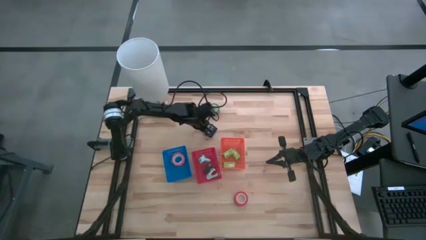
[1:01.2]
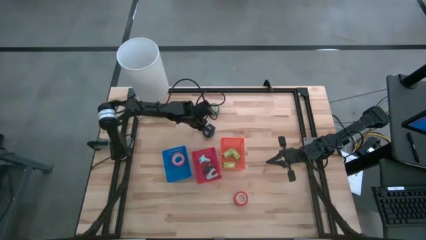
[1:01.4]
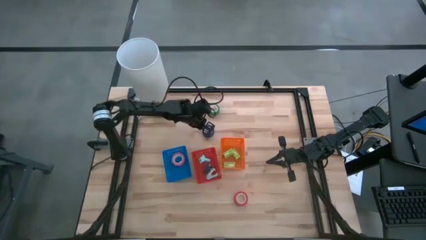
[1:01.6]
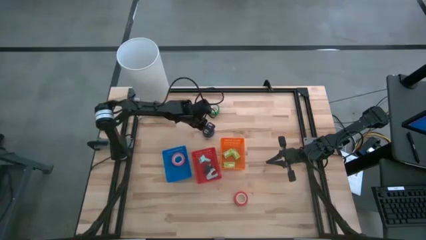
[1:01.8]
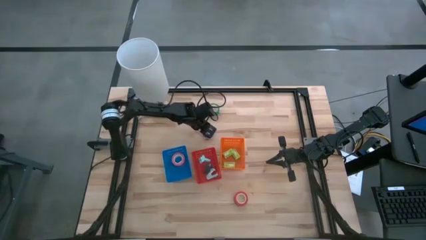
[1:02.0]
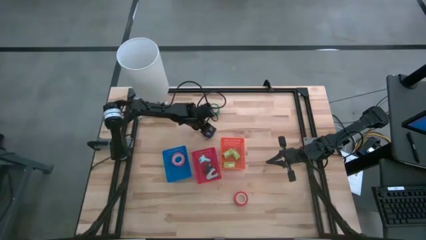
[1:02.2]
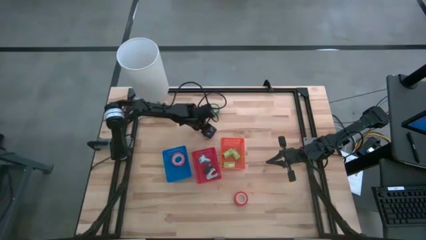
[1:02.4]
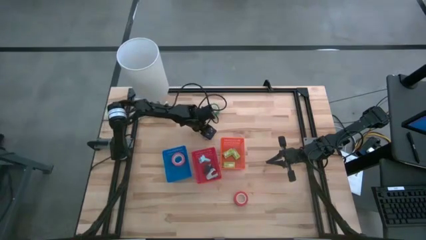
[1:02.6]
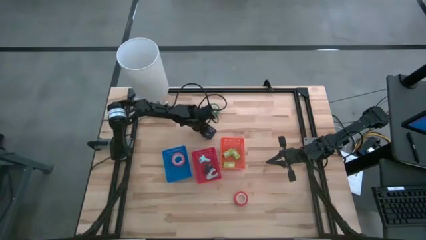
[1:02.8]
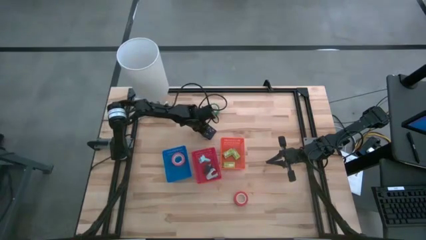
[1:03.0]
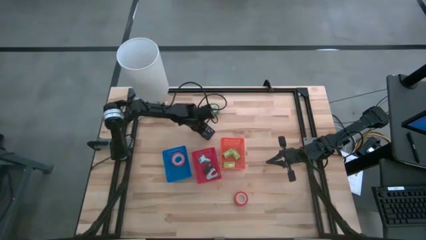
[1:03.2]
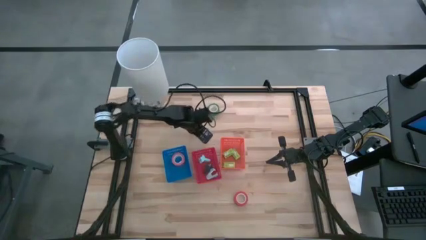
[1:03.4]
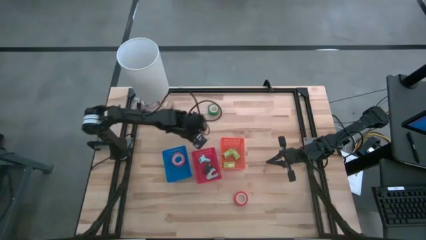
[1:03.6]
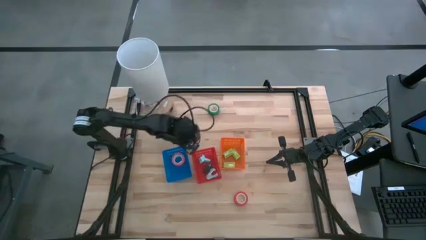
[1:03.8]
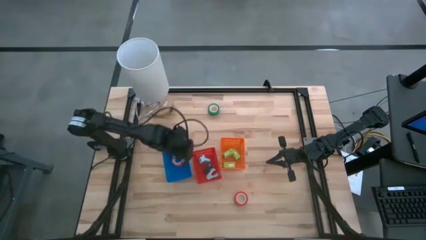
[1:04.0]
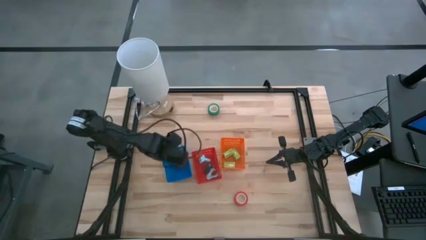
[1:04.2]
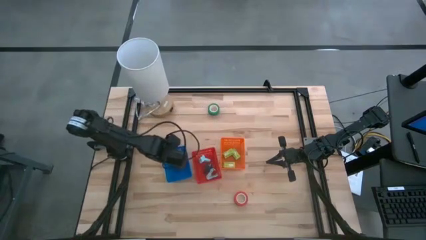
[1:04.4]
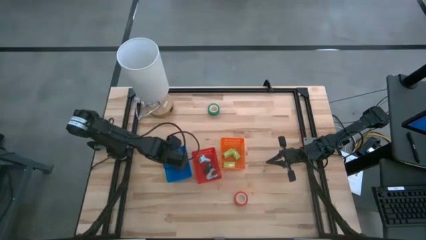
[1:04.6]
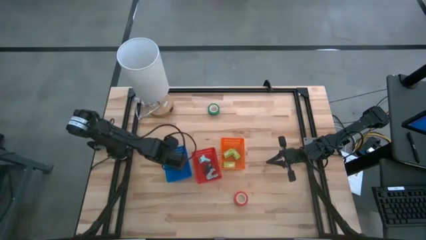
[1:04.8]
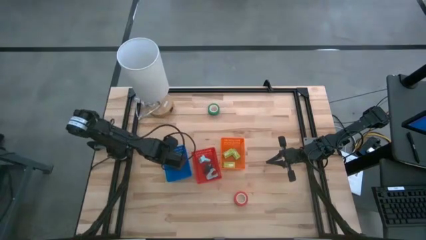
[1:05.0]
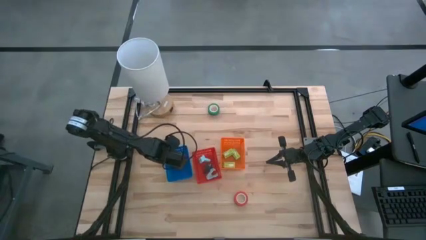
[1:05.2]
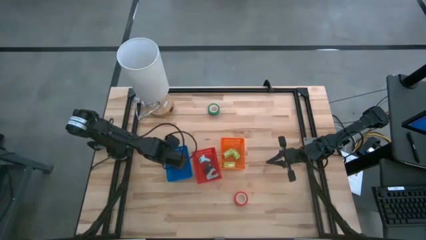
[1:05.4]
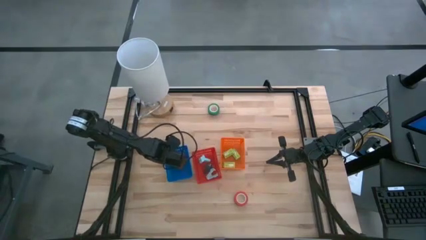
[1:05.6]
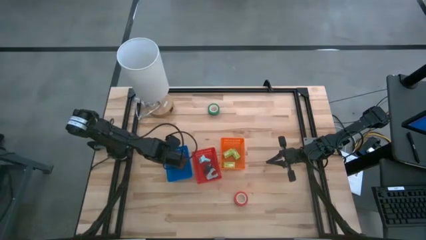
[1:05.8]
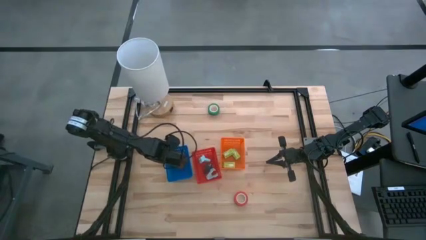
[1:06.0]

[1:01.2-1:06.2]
Task: Pick and place Stapler, Stapler remover, tape
Put the blue tape into the blue bin

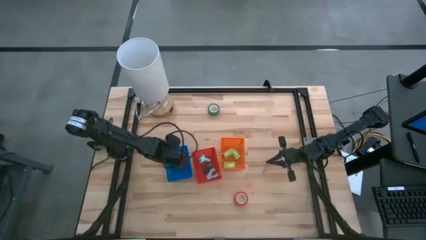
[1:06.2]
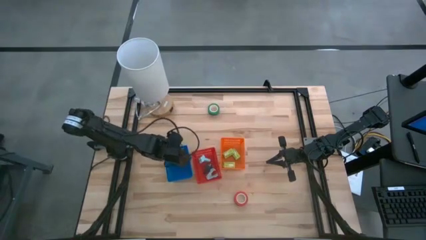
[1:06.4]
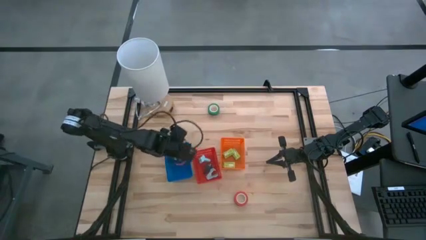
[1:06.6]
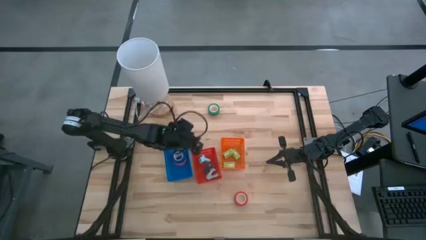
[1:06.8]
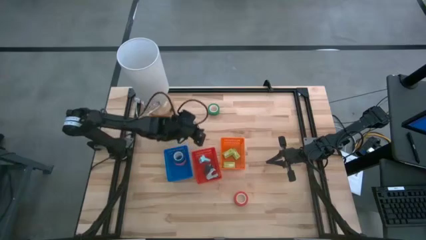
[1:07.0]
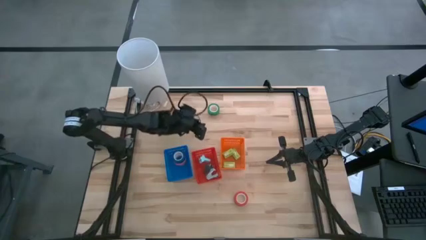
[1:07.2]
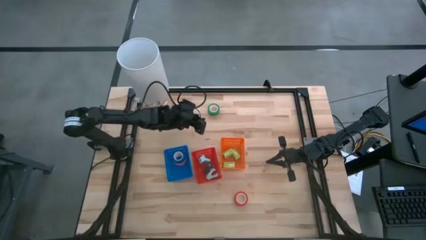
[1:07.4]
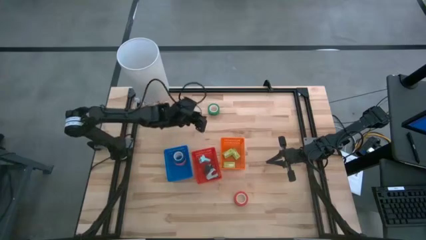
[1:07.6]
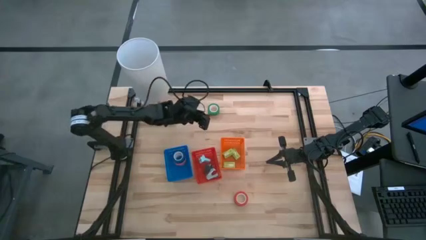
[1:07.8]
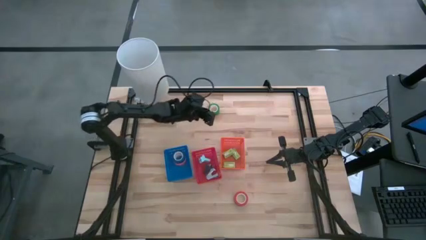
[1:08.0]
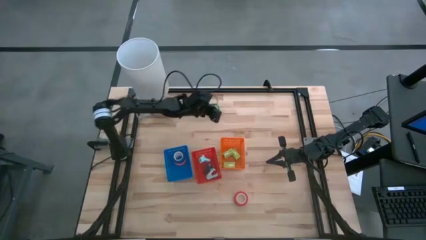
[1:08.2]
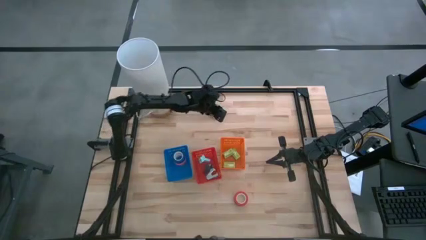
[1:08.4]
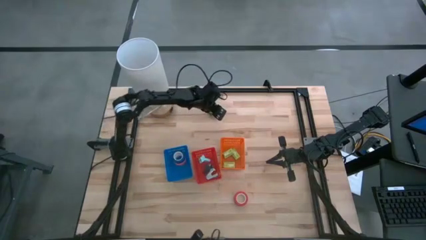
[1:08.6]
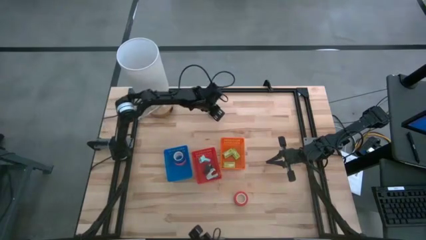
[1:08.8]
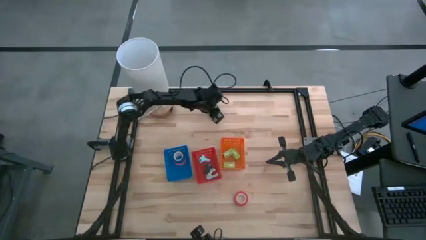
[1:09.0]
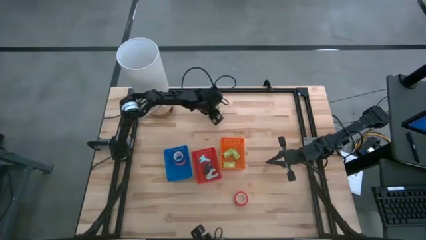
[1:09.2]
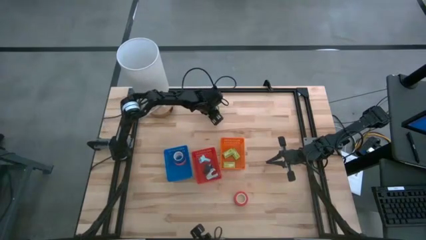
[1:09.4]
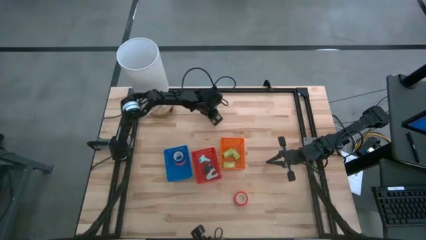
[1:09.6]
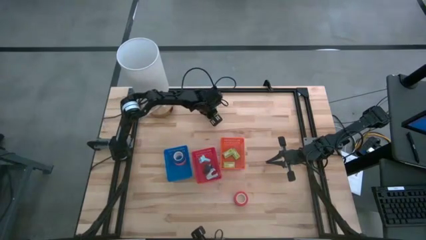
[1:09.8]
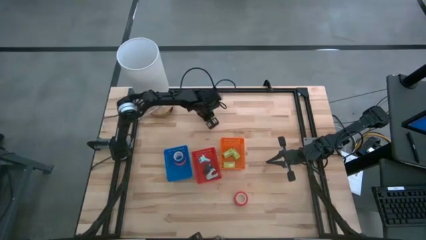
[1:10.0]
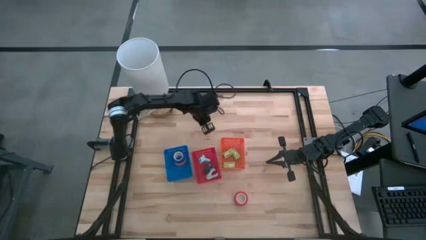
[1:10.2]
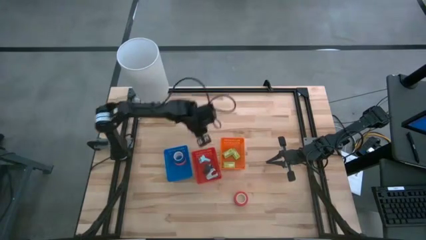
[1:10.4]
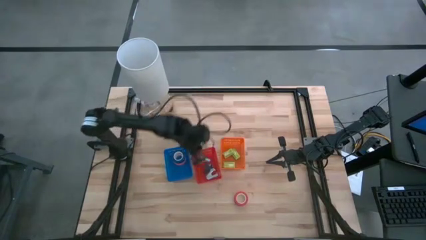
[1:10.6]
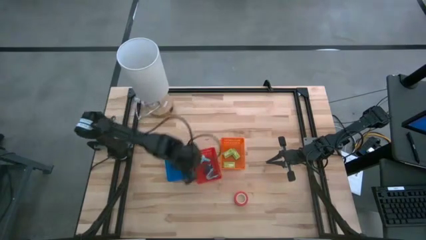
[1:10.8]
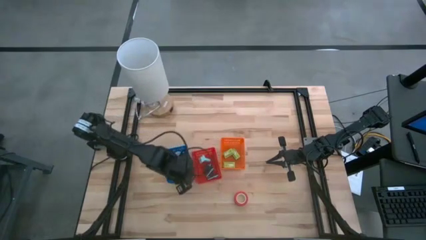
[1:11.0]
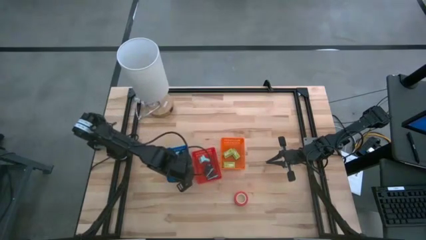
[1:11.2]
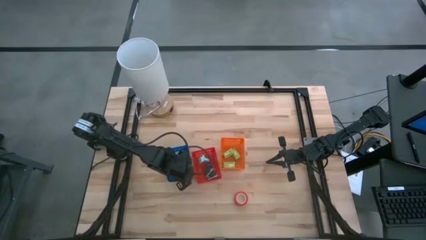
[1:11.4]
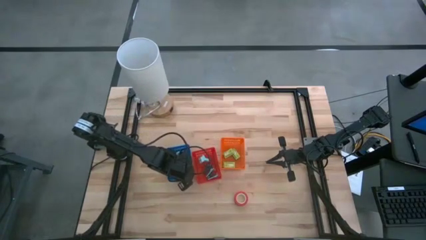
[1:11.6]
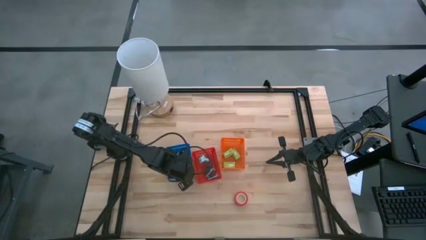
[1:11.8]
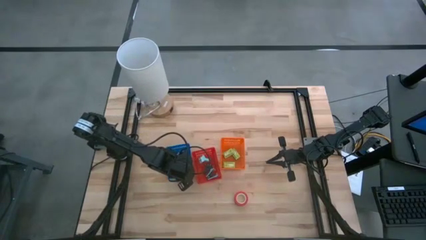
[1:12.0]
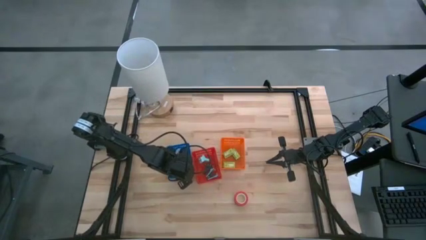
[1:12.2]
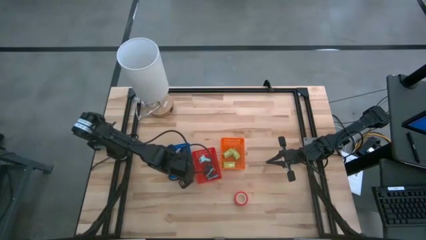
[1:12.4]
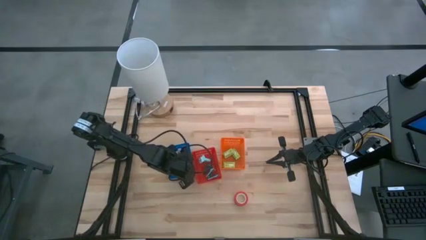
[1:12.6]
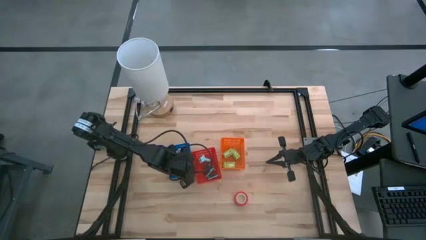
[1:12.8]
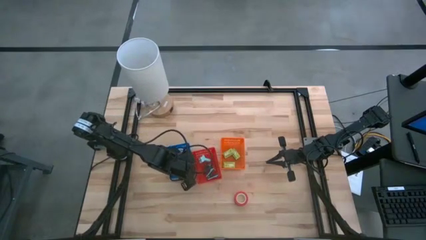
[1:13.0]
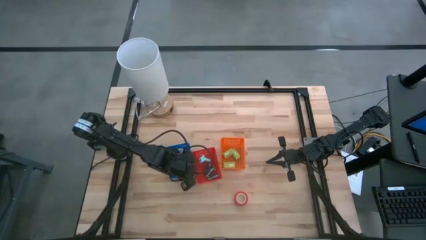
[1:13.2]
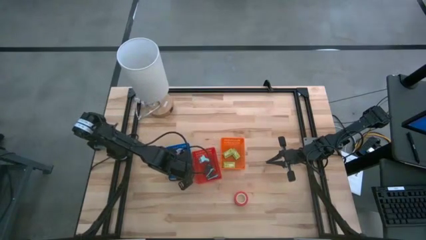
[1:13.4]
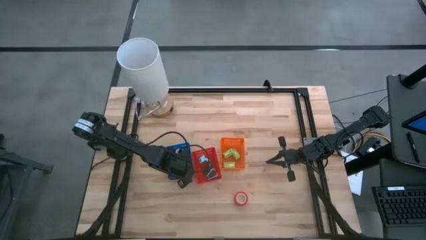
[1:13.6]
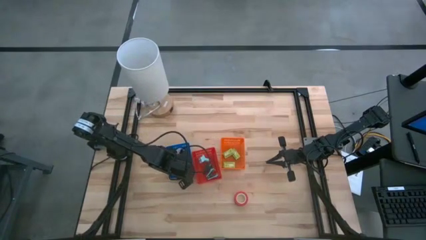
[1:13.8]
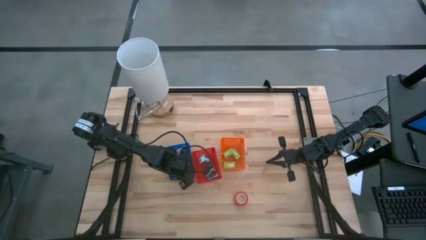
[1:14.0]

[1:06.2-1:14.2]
Put the green tape into the blue bin

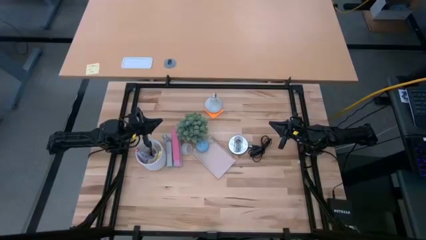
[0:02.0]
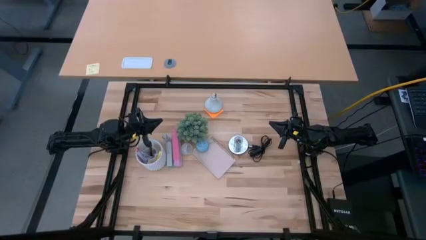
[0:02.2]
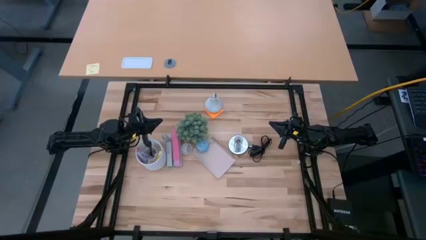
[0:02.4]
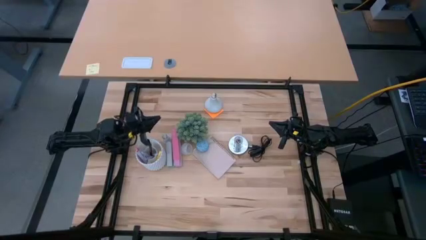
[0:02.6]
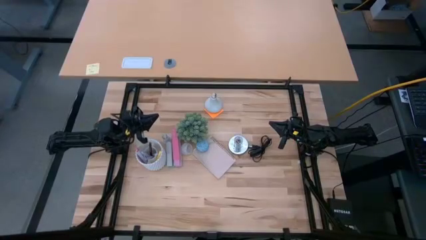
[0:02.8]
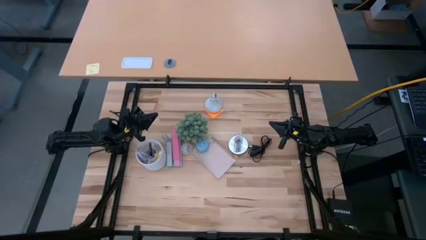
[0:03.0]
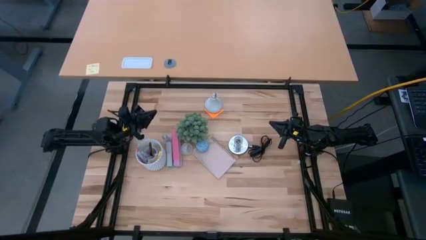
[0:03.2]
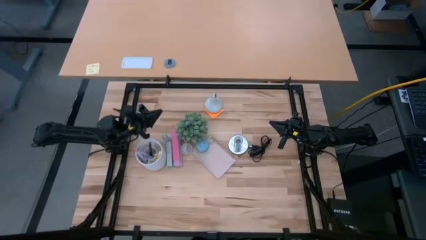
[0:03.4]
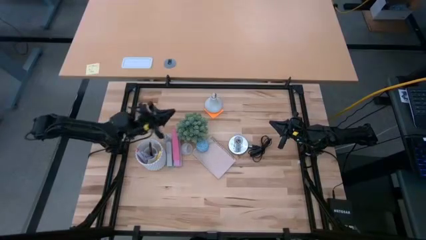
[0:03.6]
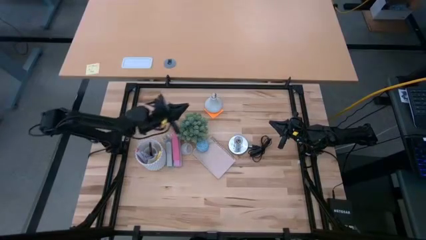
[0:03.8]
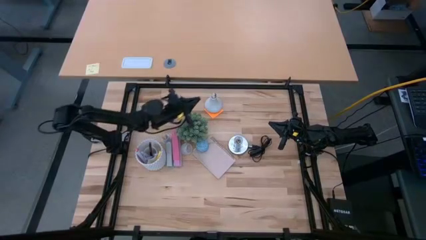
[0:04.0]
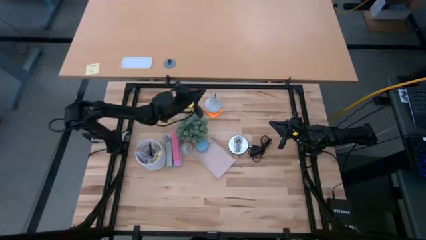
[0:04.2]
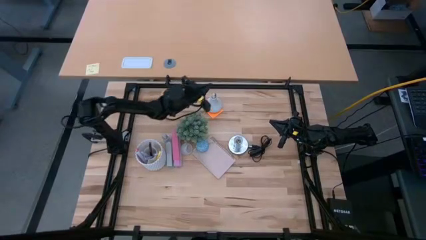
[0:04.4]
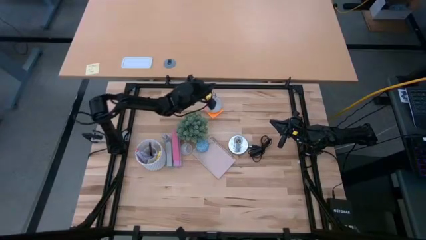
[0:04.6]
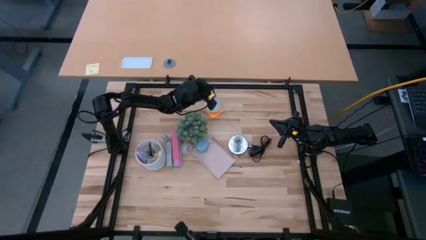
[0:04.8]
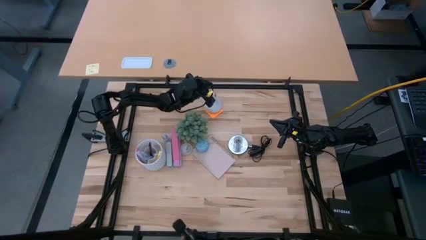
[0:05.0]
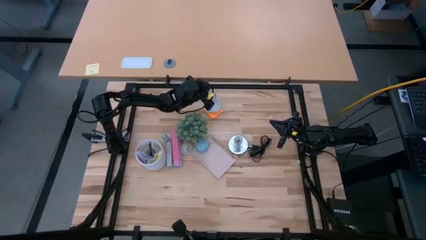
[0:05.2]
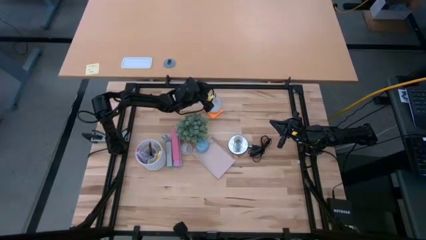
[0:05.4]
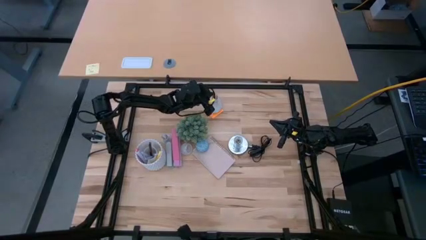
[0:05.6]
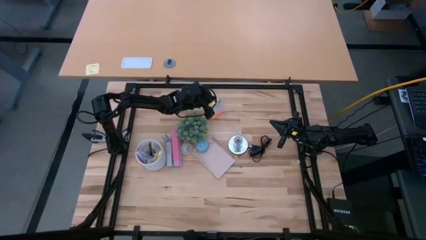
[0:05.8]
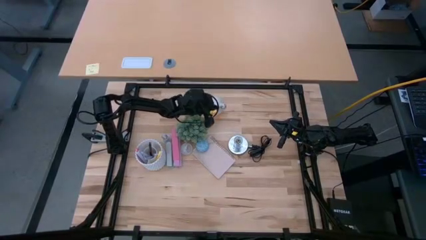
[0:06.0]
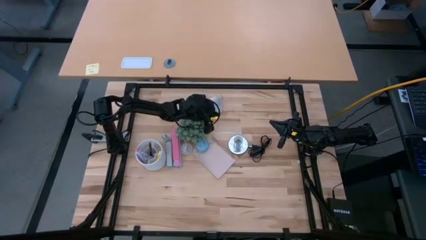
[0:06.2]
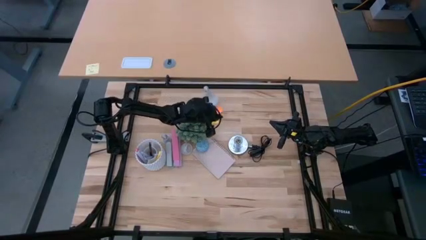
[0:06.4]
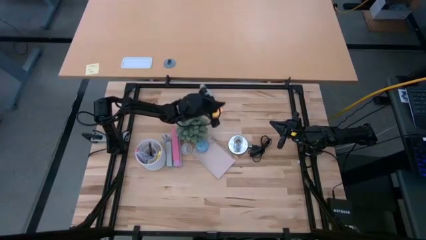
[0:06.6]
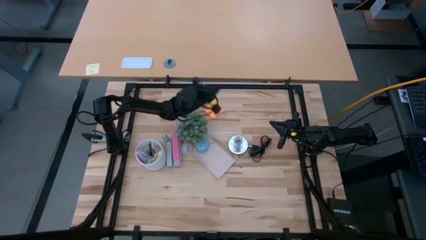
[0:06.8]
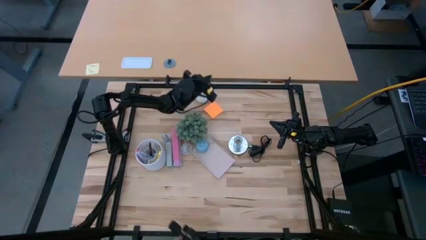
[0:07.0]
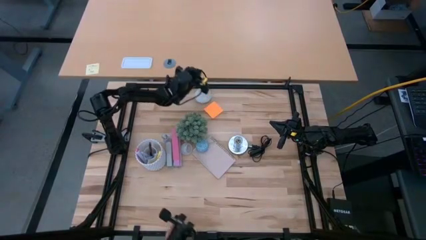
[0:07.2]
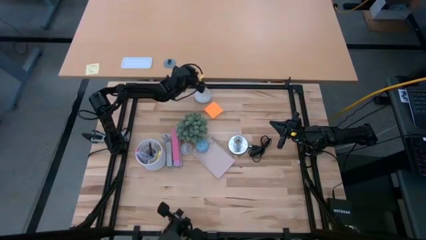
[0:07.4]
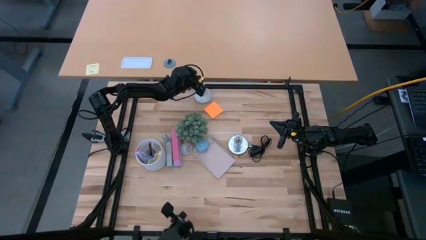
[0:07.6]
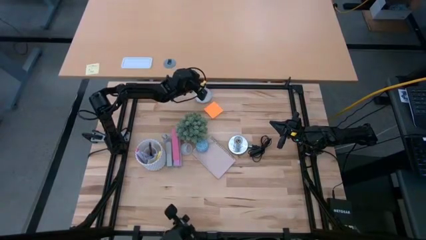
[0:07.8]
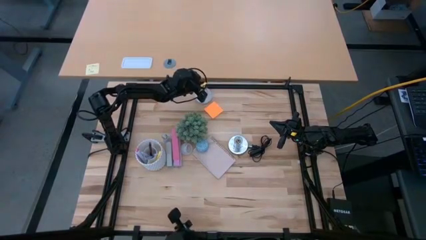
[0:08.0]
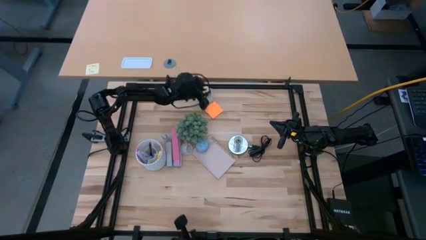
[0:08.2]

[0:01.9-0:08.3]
Task: Screw lightbulb
Insert the lightbulb into the silver lamp socket
